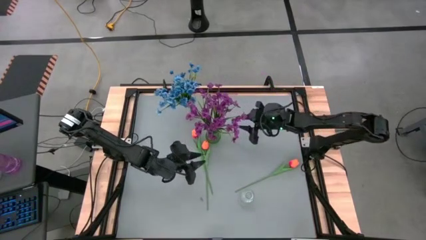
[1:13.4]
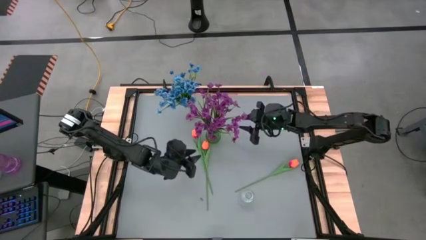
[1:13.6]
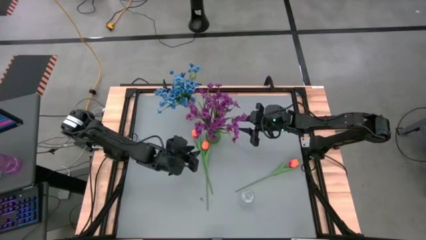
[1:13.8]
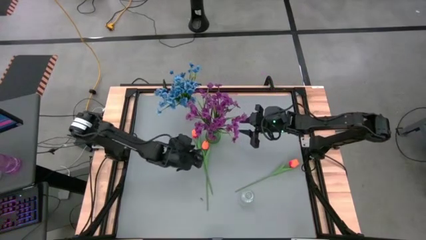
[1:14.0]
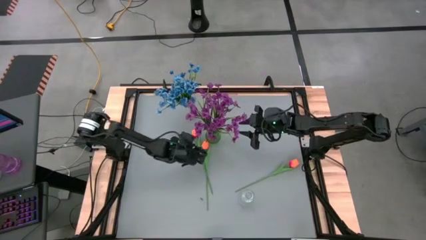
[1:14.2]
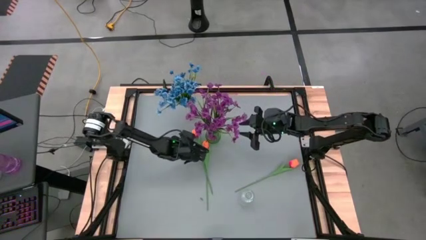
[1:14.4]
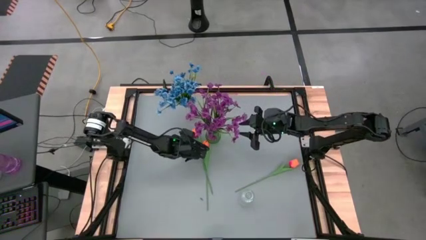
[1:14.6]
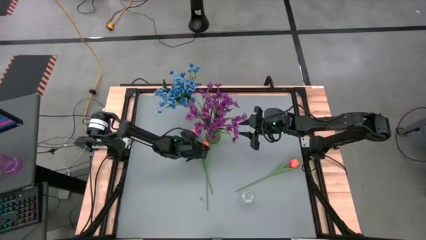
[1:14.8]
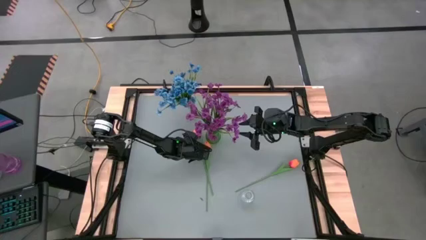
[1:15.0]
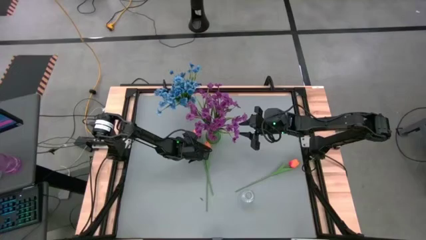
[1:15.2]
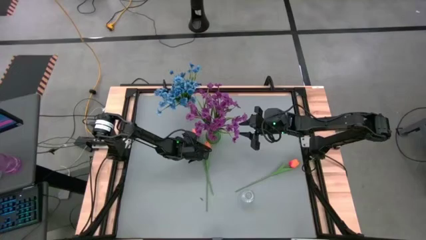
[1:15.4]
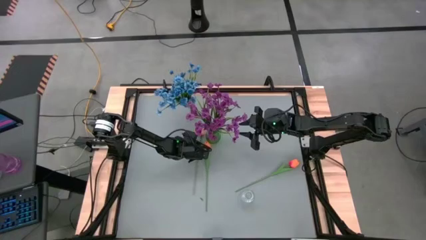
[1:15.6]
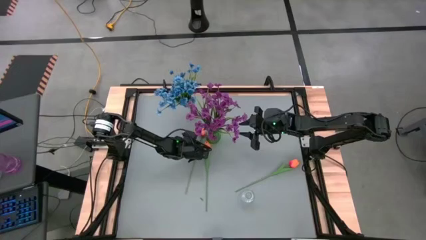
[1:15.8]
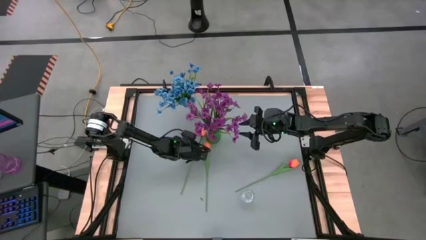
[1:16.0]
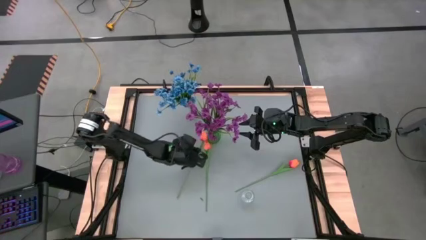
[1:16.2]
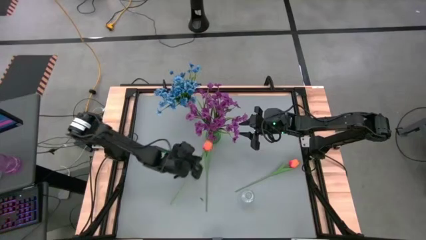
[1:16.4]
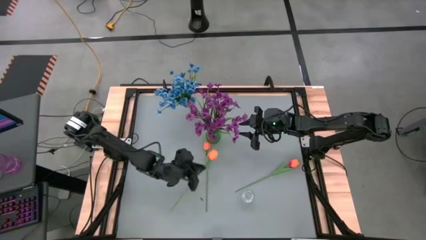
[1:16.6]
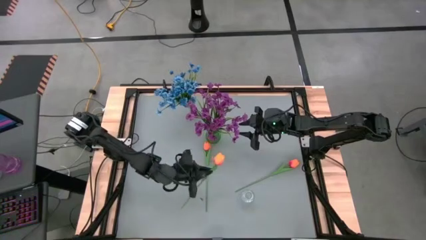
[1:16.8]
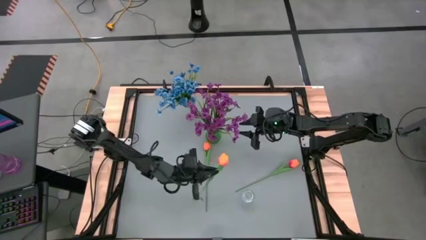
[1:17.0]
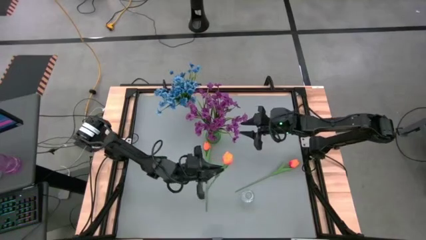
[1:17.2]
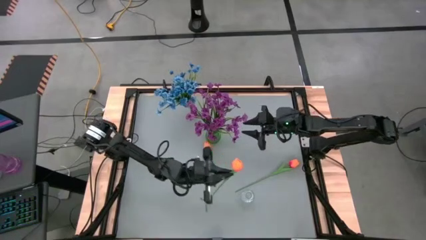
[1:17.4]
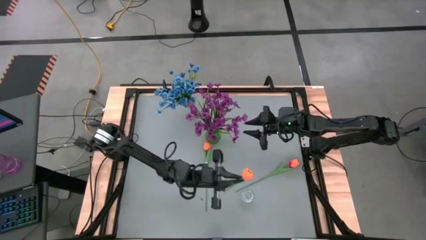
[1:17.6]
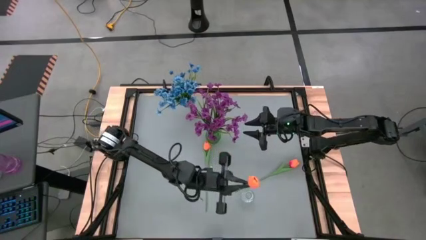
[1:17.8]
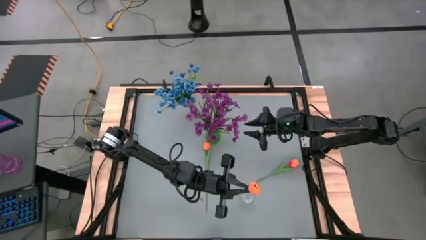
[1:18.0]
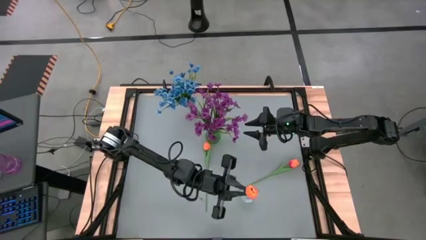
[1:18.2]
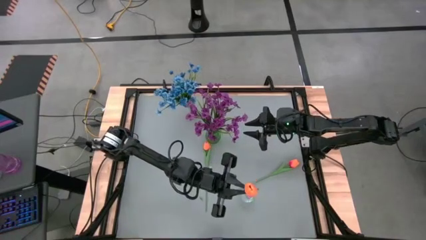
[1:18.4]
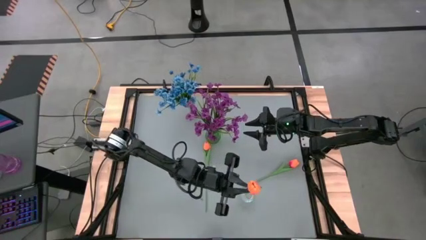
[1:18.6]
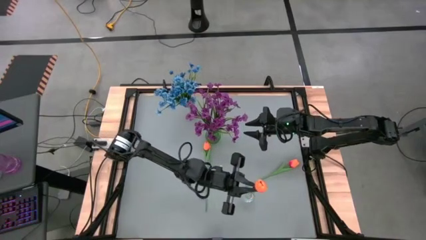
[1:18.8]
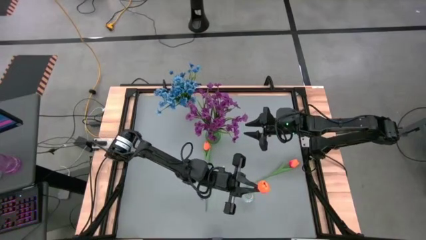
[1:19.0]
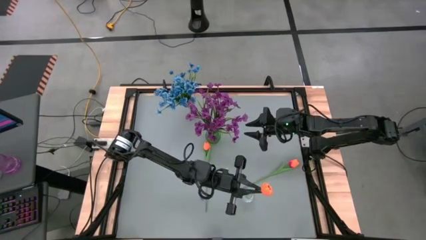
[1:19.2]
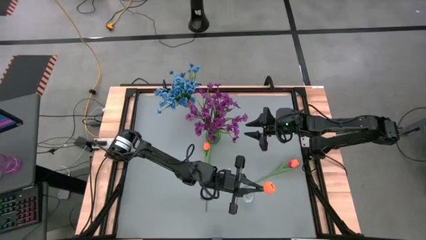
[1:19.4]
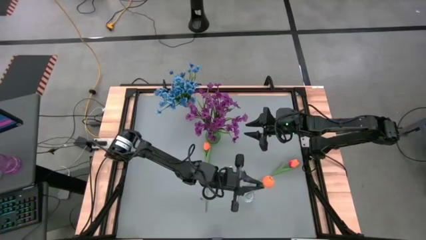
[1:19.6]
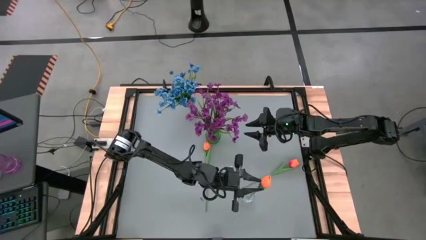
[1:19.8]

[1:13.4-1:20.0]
Task: Sort flowers into vase by color
Put the top orange flower into the bottom transparent vase

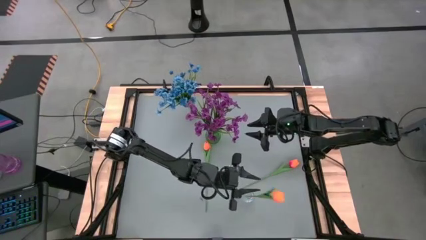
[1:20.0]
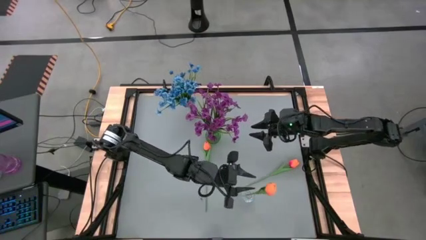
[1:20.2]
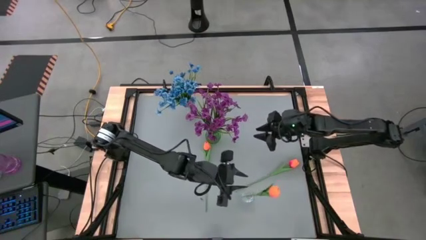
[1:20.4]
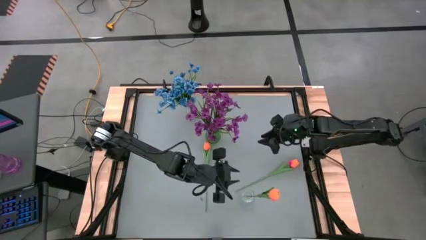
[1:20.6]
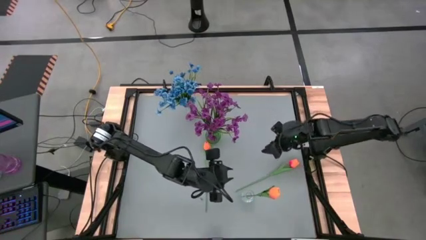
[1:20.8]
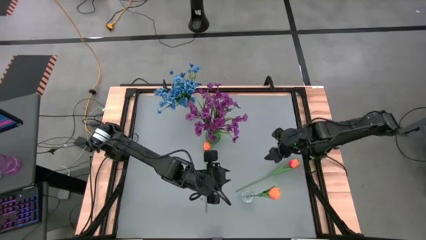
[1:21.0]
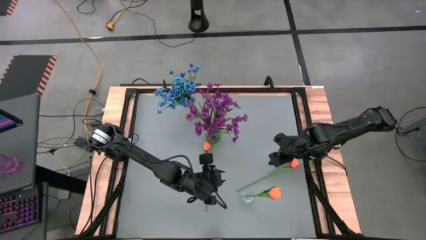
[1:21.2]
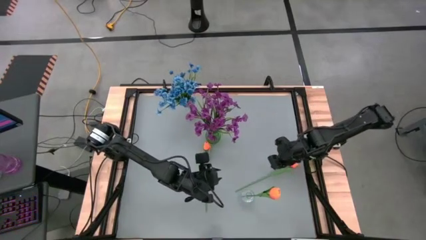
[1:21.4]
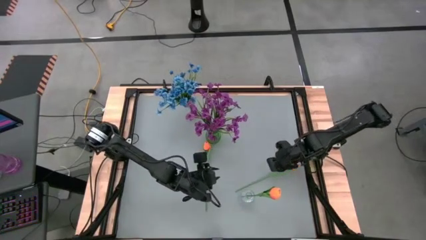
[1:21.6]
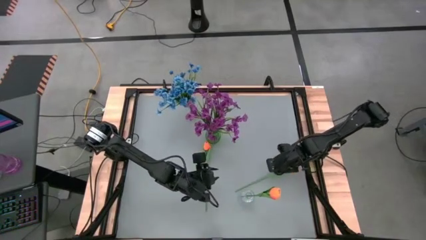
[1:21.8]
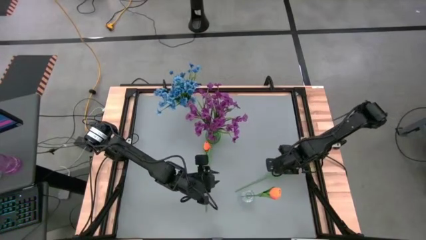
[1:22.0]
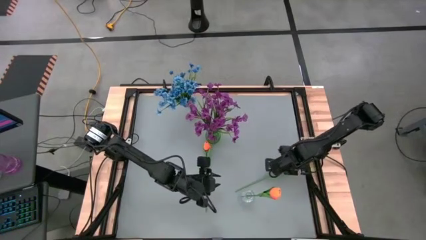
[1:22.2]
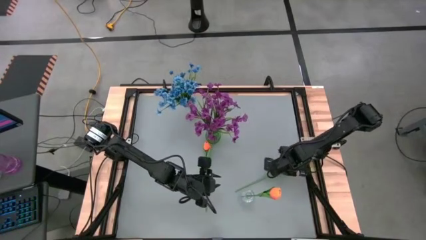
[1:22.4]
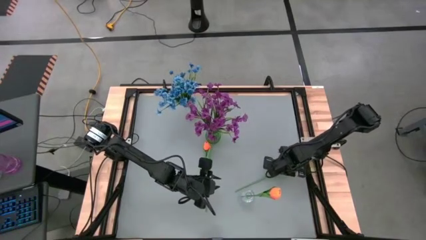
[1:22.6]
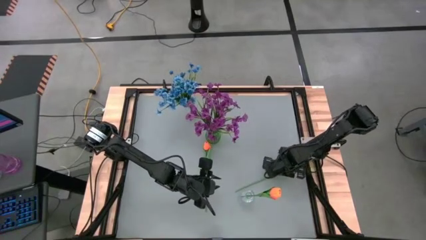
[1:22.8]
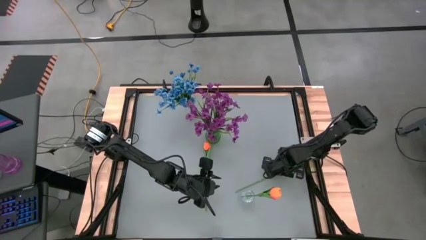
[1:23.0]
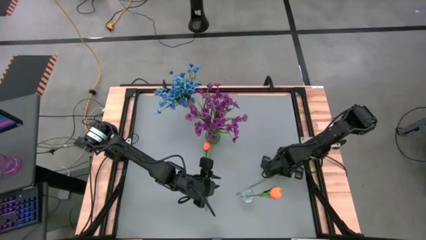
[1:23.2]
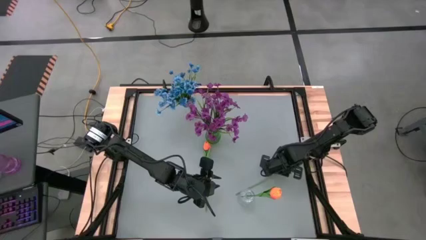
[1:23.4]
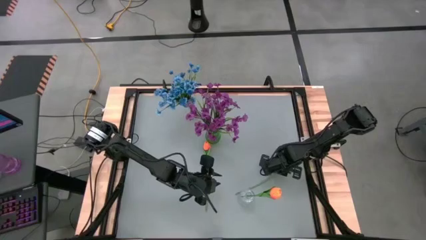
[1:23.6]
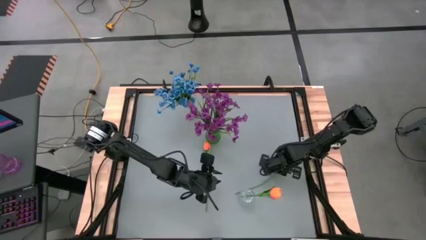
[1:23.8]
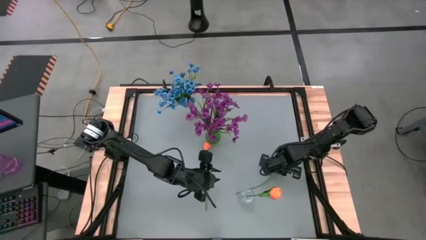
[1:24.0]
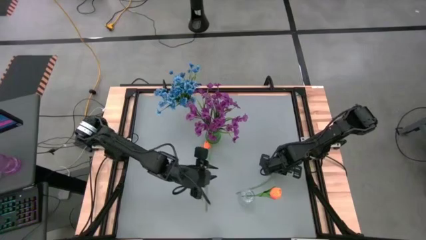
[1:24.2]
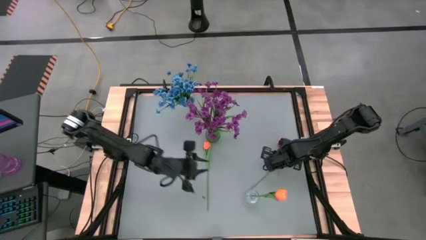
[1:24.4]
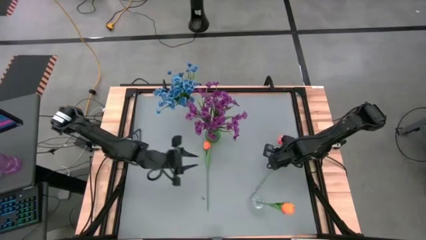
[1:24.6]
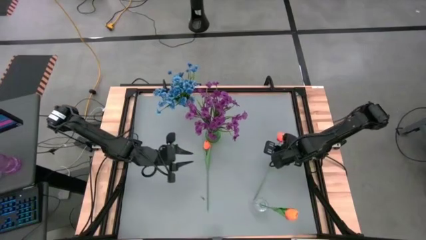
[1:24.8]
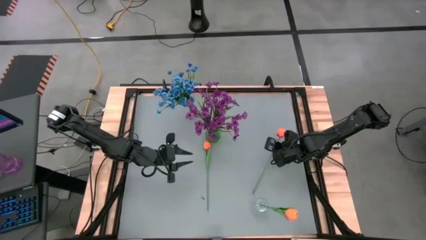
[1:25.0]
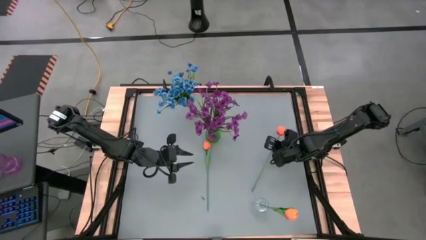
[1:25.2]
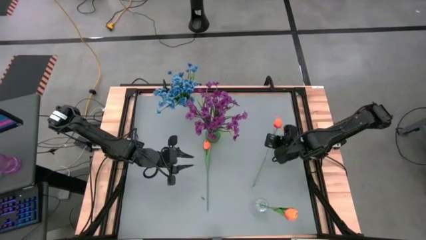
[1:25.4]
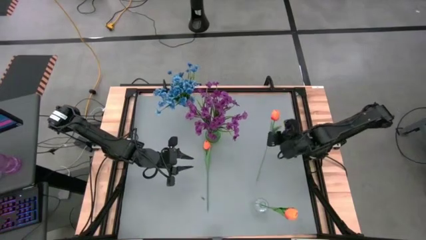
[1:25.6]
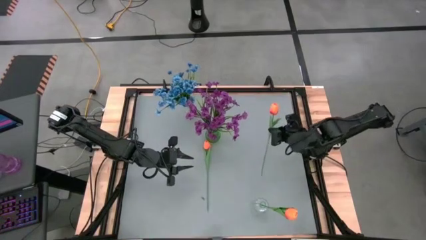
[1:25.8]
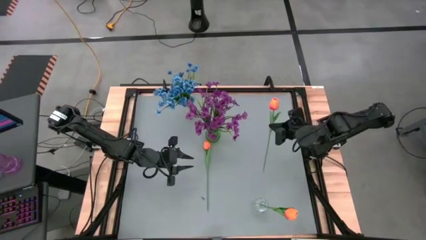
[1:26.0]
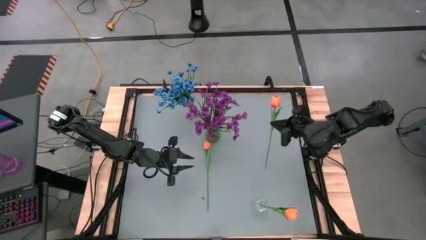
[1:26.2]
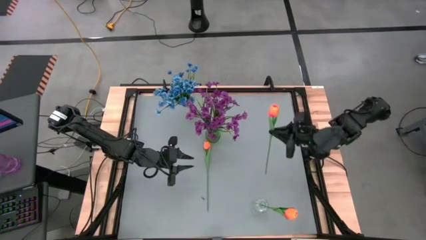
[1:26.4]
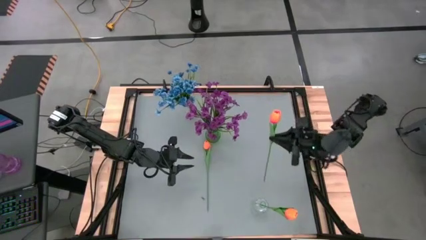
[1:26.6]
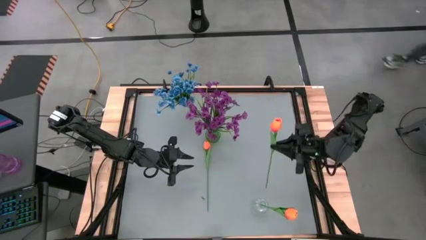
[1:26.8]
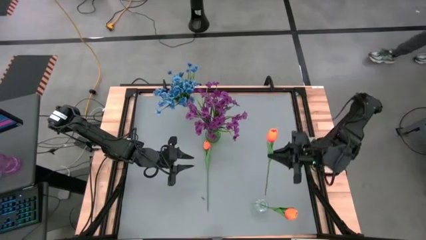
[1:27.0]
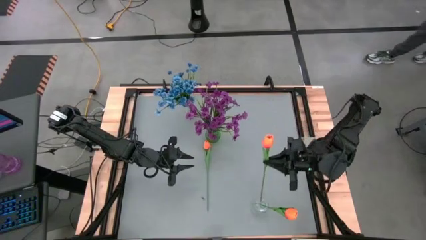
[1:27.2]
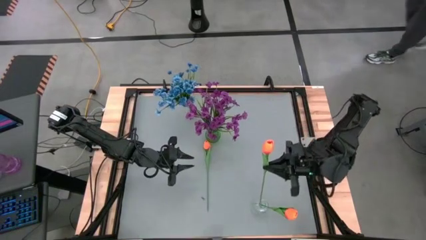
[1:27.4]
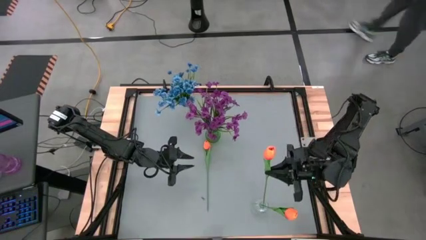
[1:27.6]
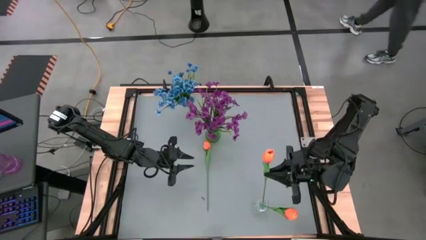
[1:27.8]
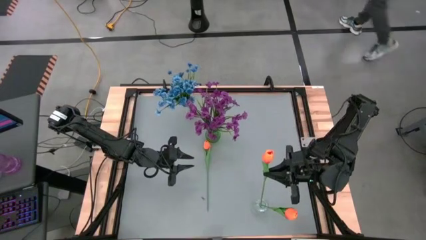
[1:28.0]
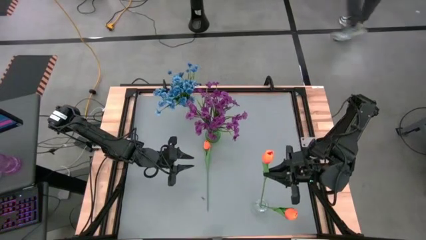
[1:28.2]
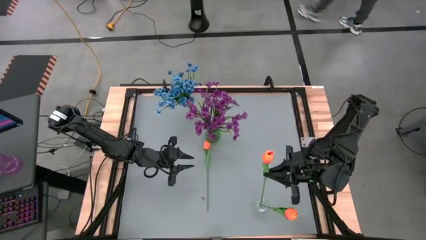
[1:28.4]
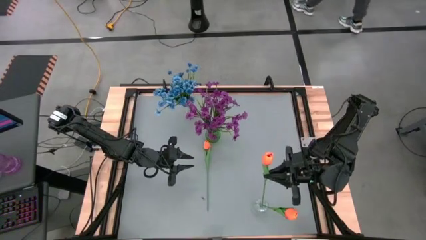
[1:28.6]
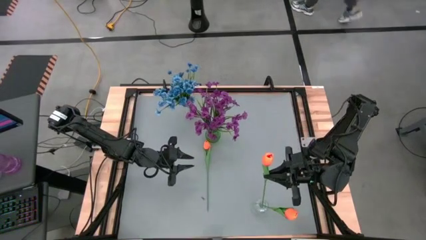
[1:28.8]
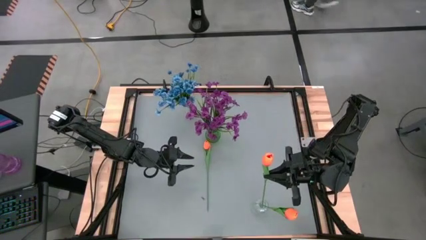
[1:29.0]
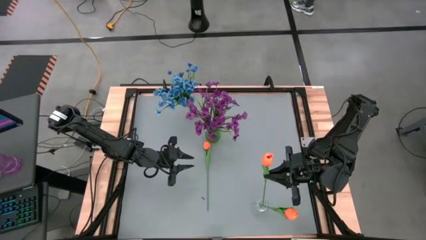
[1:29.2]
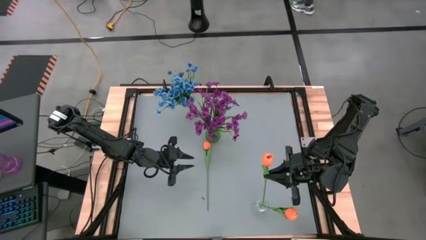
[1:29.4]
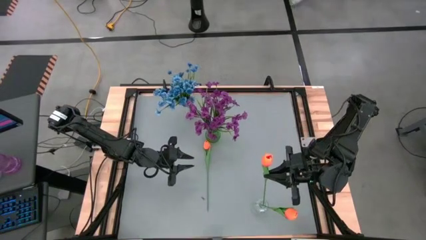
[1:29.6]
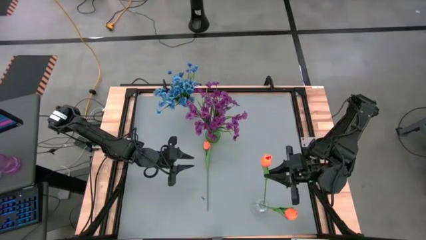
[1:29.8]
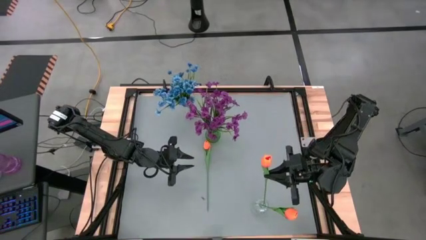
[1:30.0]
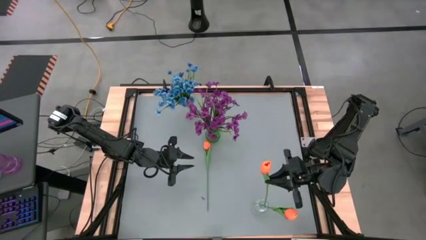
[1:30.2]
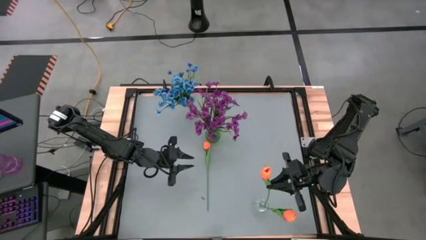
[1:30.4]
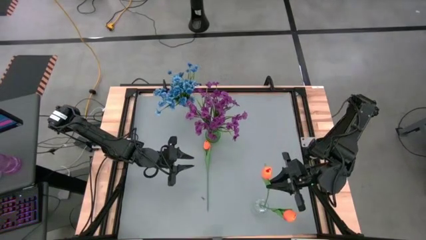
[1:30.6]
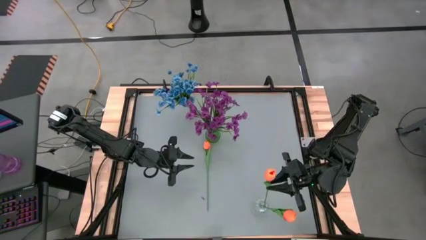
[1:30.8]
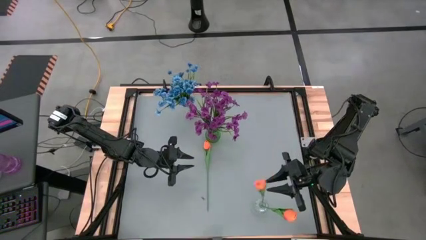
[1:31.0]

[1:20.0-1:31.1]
Put the right orange flower into the bottom transparent vase
